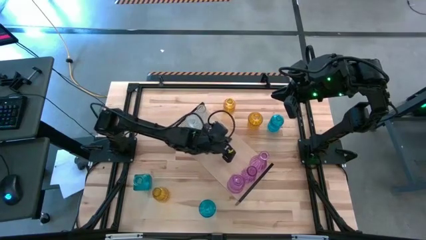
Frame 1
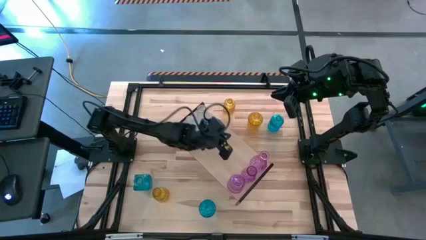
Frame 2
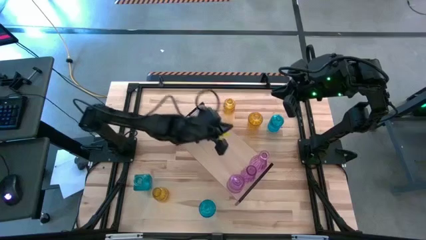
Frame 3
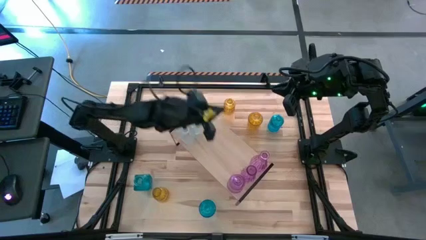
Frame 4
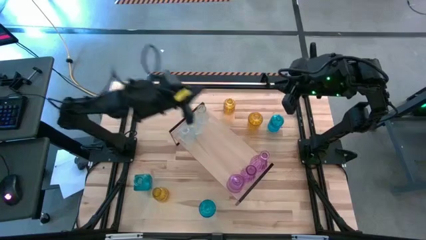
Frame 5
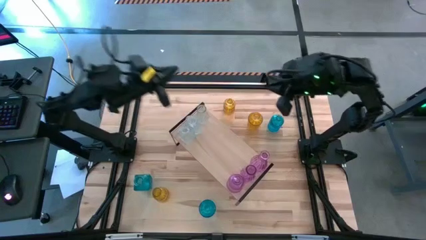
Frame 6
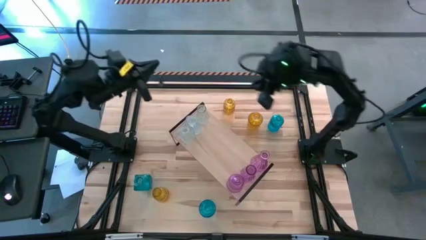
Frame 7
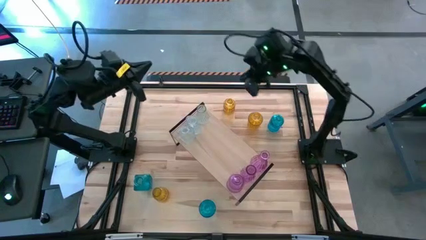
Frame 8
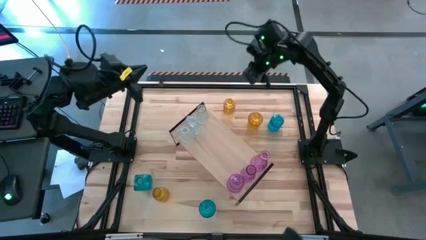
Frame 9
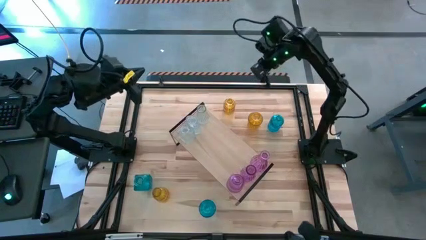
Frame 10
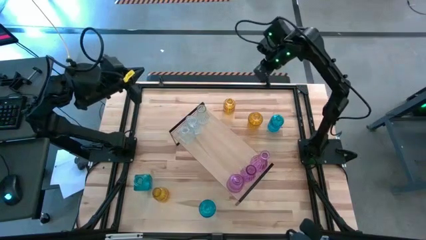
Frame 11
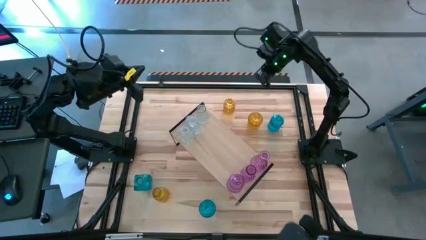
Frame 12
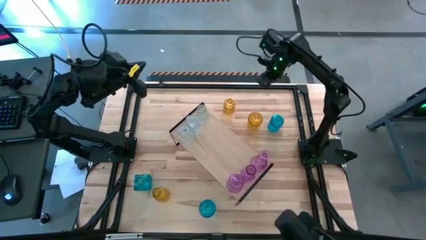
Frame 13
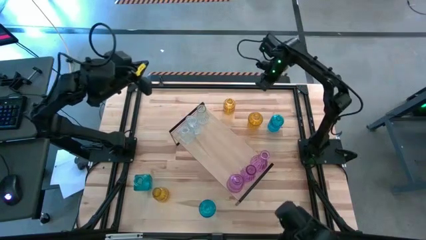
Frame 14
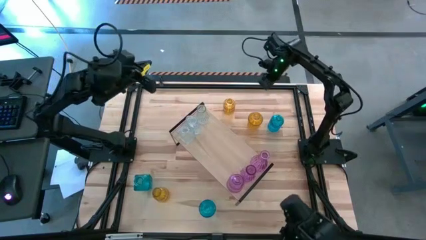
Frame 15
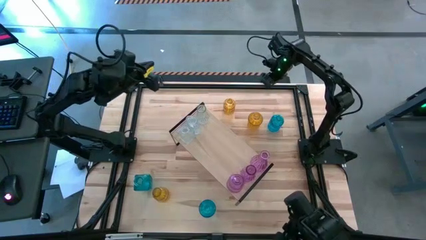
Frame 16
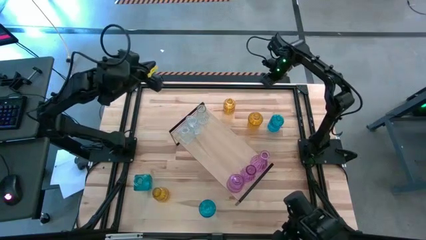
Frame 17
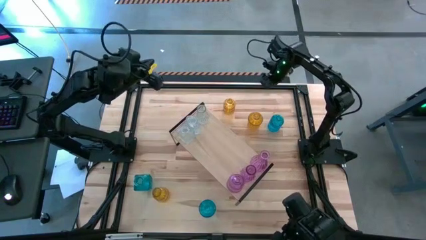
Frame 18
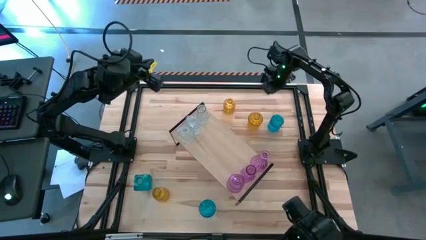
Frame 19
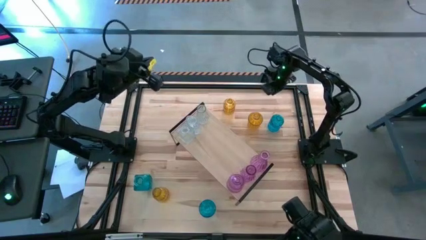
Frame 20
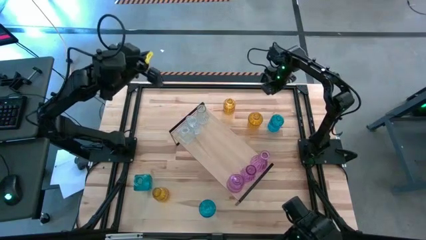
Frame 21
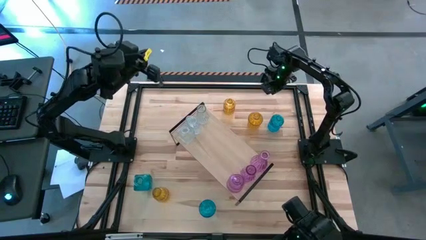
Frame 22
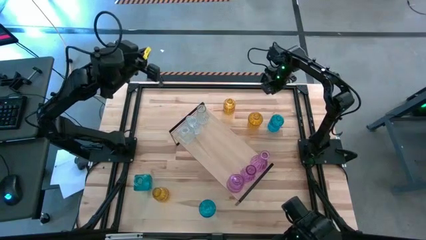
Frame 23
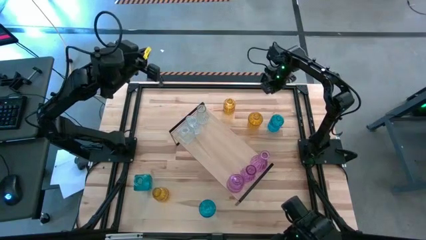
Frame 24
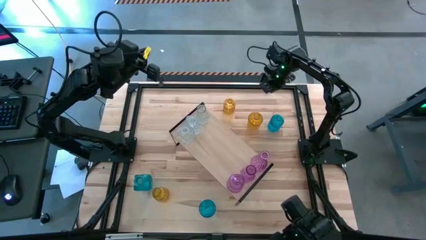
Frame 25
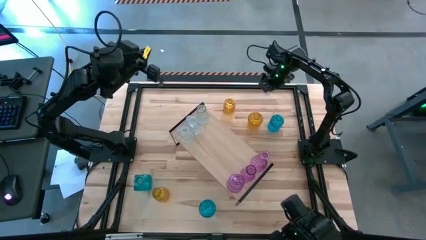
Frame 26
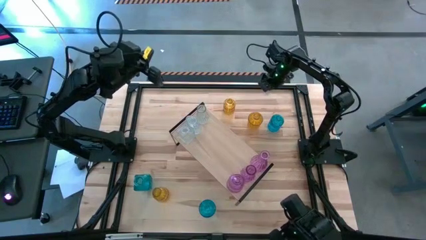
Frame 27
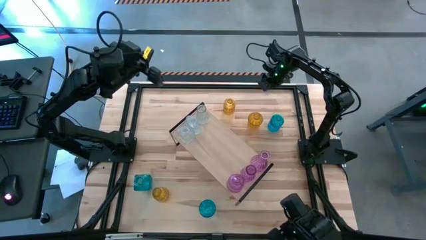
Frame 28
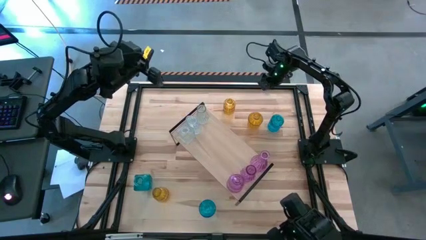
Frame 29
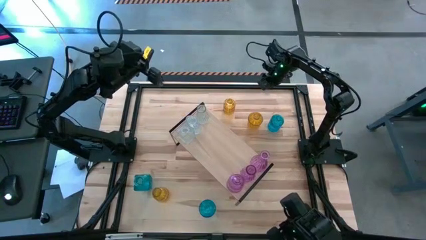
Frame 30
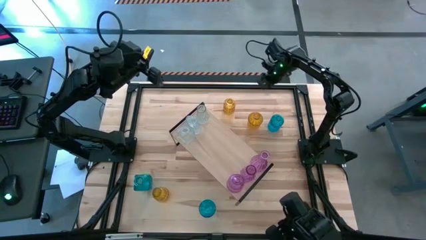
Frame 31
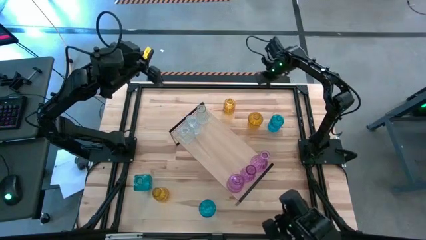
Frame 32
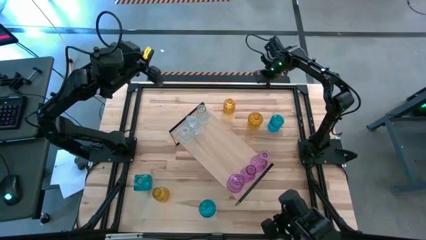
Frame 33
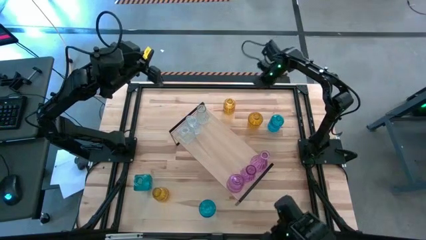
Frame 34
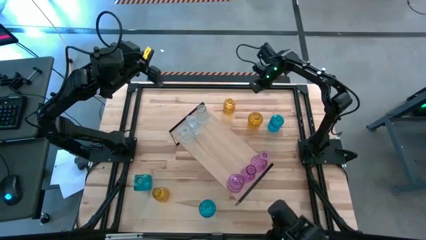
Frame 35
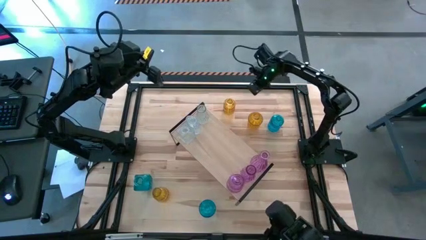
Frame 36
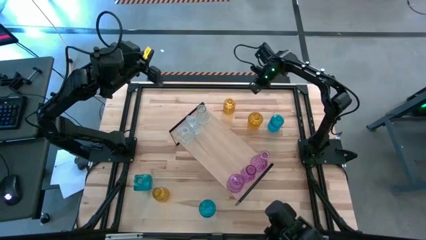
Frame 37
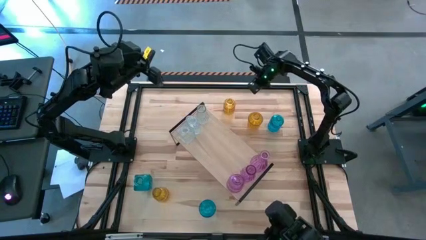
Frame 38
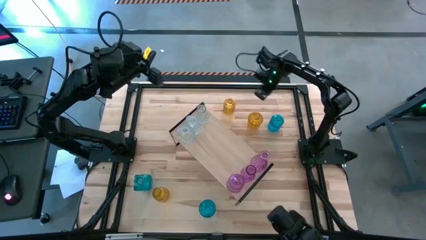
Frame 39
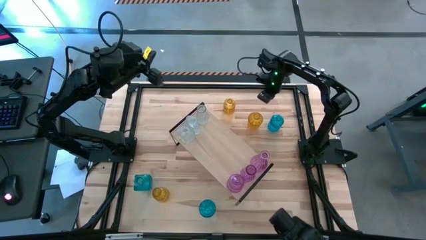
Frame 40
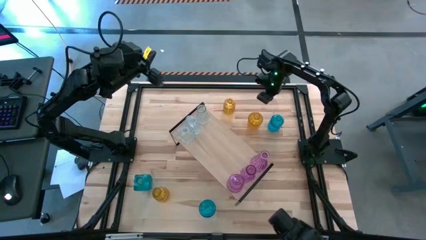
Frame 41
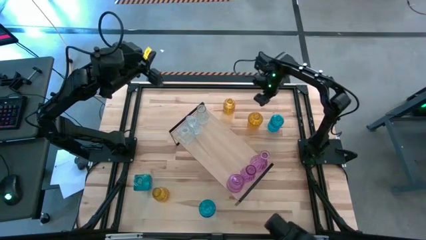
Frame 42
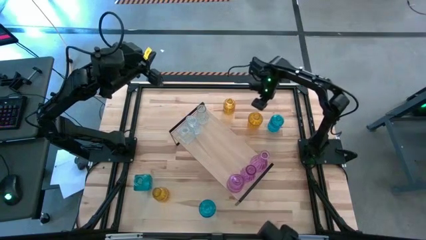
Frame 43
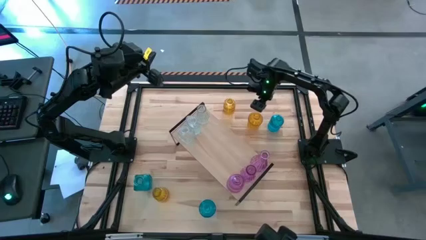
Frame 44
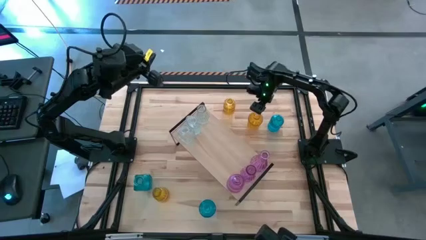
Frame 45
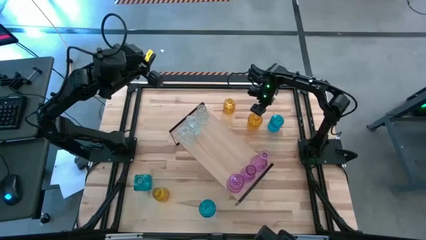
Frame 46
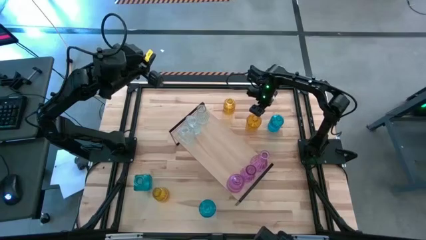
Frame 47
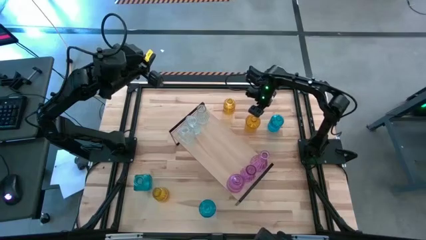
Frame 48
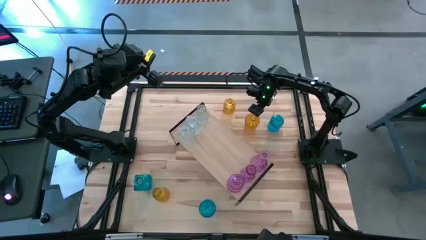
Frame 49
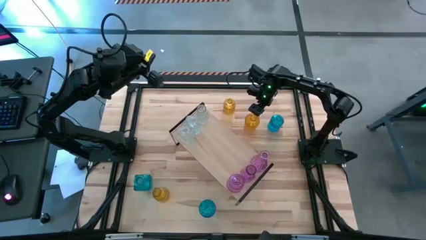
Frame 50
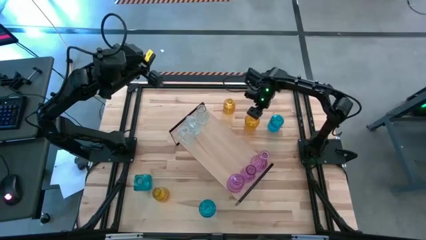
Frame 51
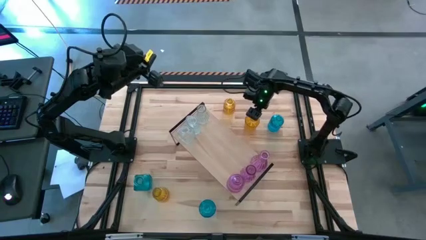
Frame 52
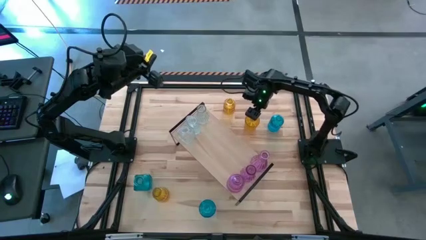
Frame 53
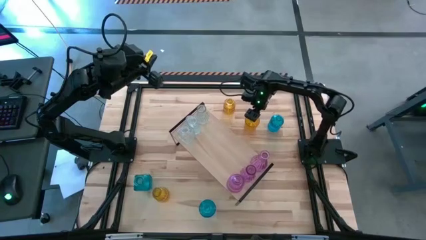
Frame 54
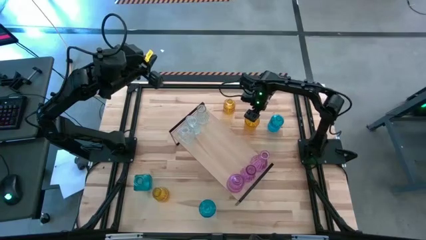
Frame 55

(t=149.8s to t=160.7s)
Task: sort vases onto shelf
Put the top right yellow flower vase on the shelf

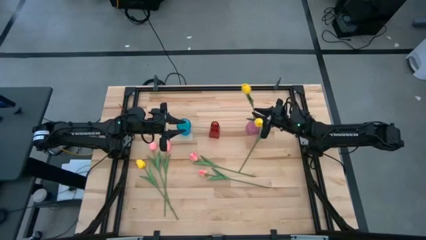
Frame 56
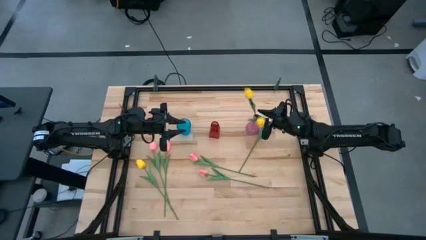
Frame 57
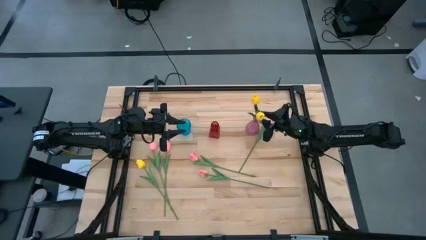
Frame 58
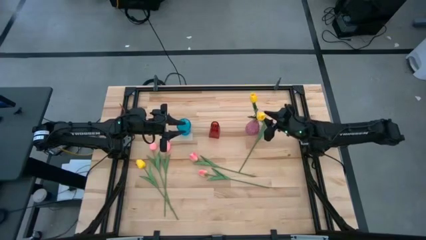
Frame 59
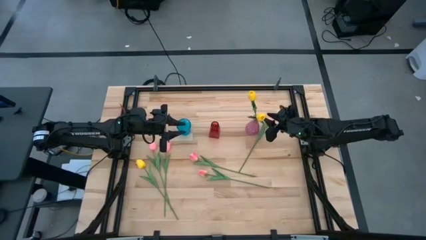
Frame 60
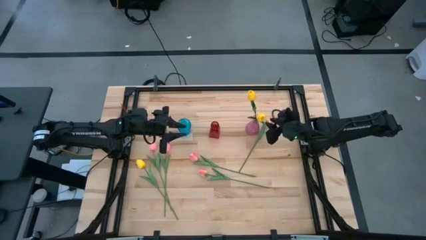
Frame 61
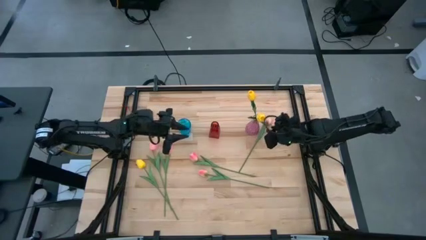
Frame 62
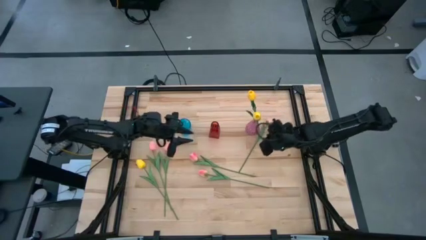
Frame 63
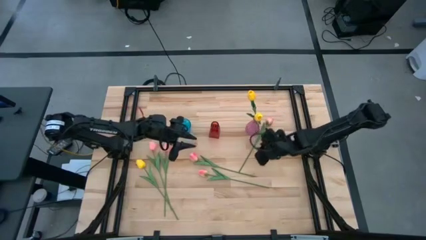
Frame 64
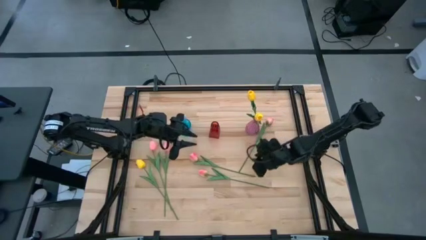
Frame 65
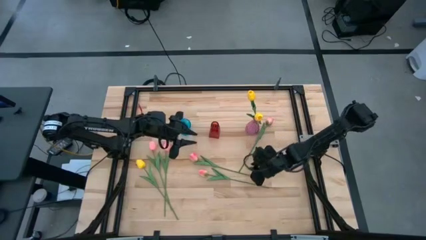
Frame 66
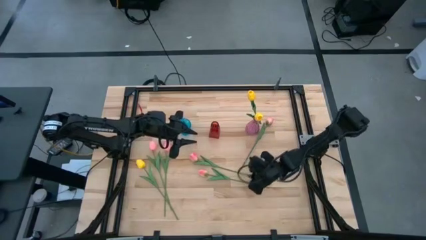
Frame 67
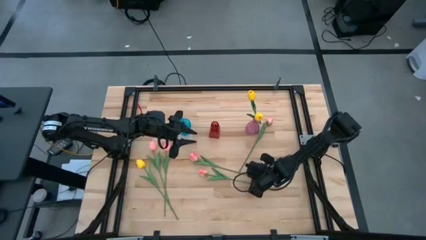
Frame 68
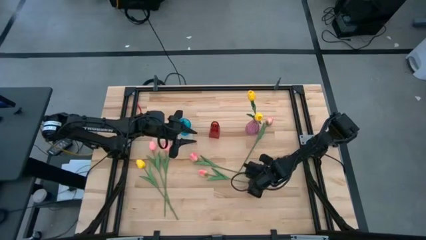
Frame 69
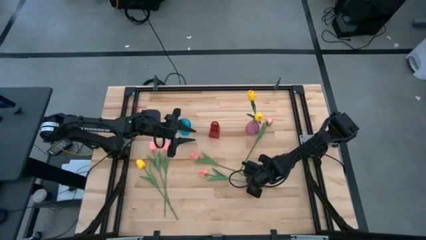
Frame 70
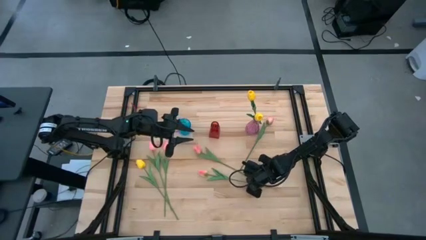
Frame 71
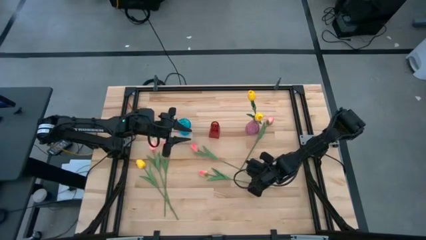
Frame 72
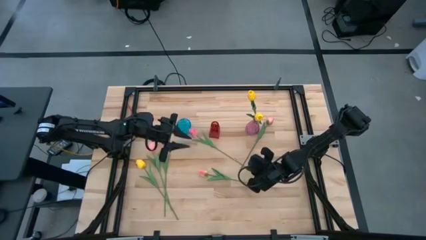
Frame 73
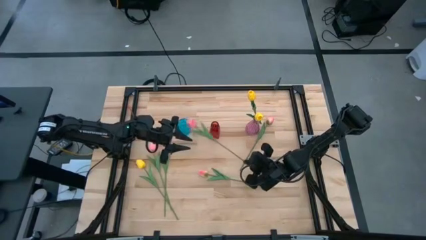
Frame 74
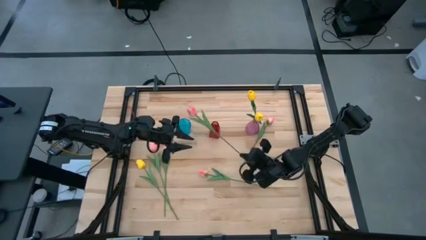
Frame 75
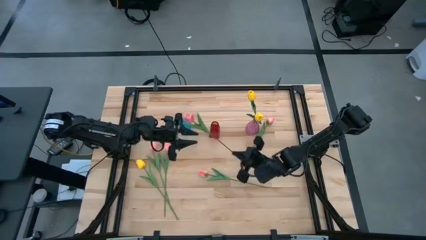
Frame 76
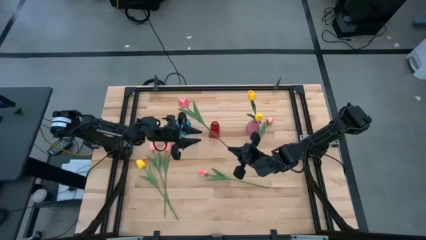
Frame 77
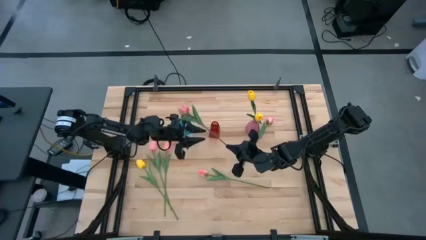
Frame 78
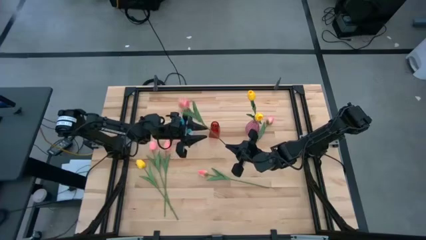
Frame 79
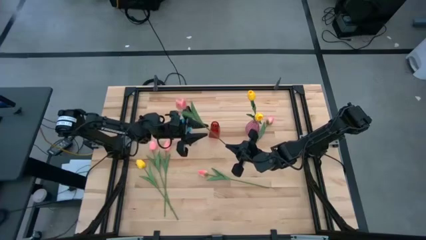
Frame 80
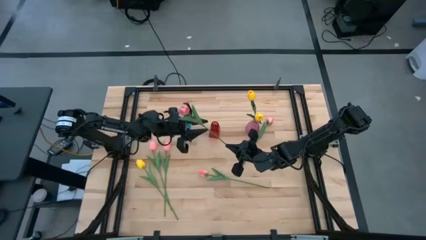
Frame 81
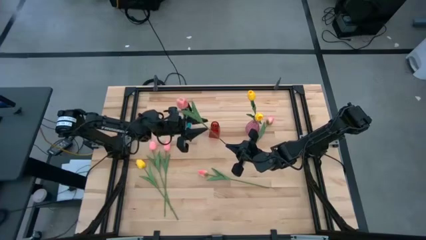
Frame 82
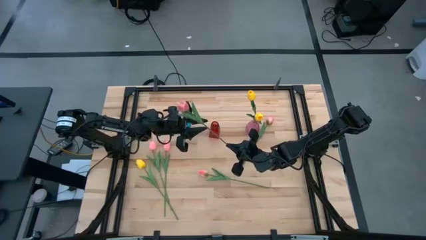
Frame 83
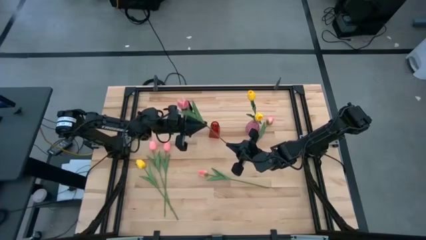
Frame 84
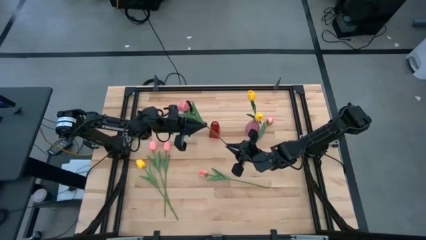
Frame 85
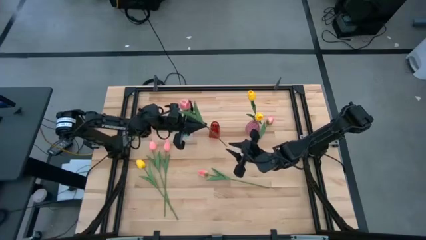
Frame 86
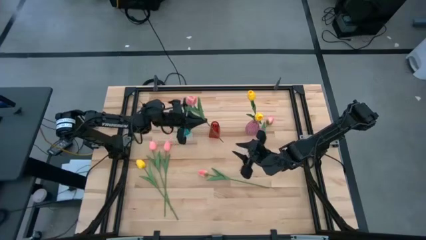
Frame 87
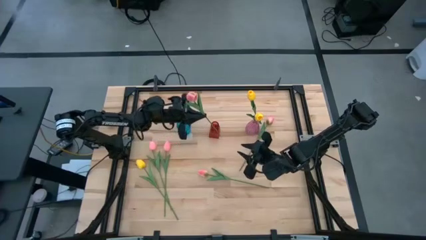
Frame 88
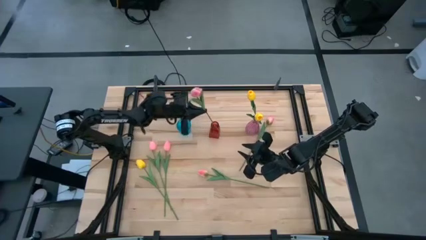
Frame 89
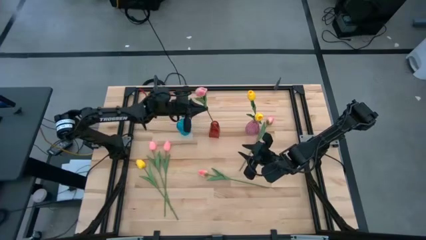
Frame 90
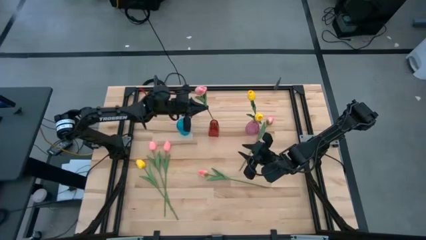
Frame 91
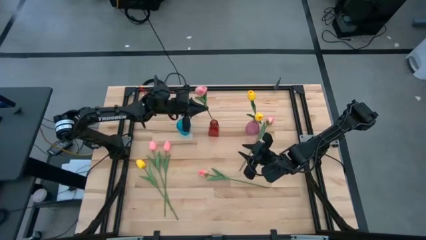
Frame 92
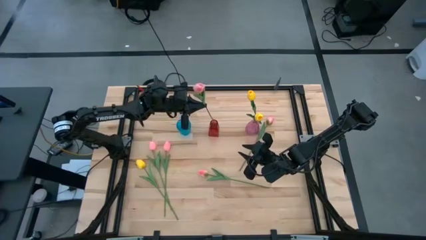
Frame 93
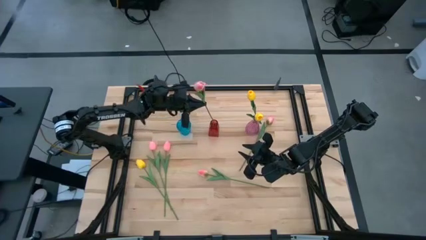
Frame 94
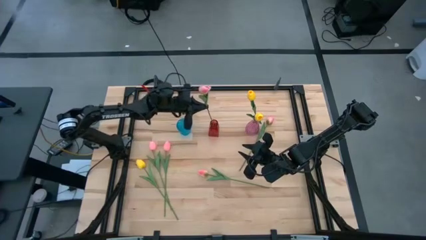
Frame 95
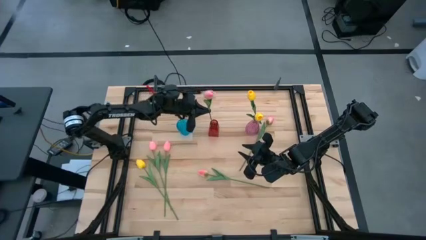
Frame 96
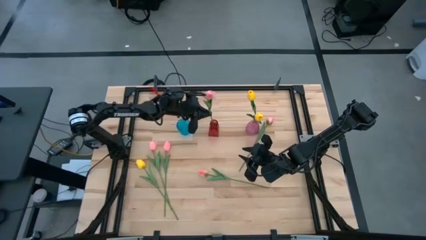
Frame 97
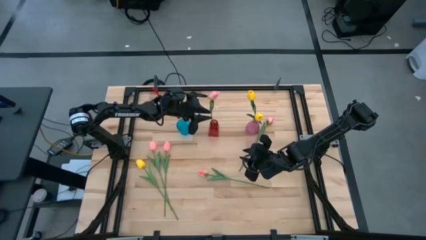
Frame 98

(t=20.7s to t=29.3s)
Task: Sort flowers into vase by color
Put the middle pink flower into the red vase
